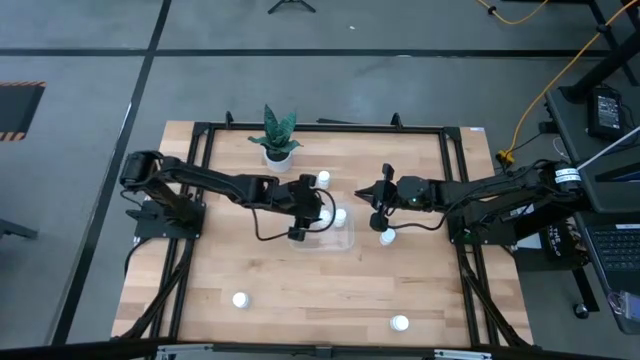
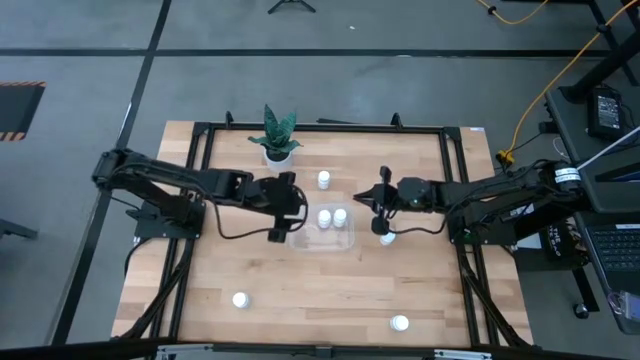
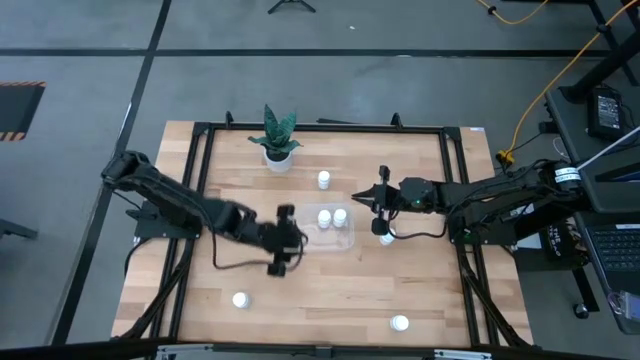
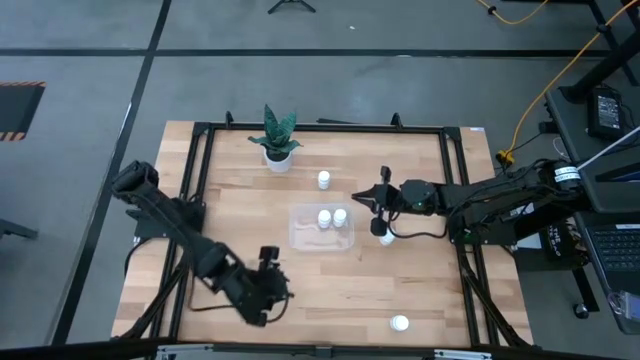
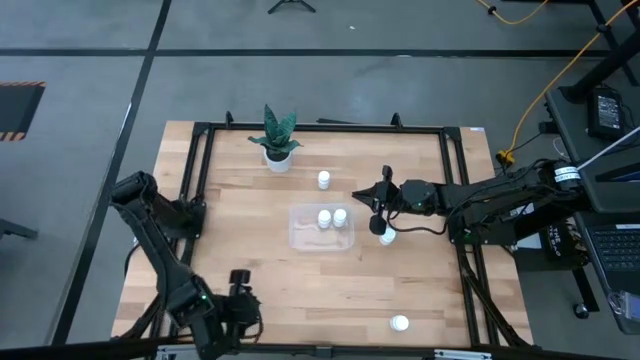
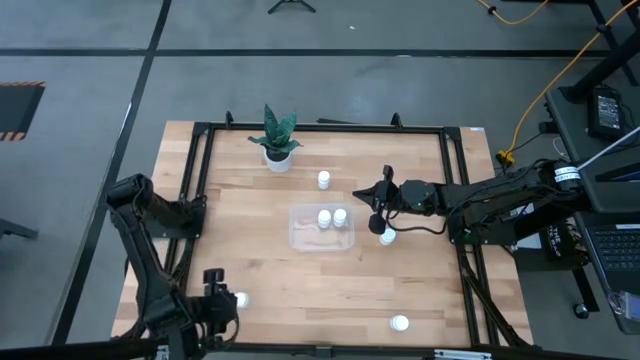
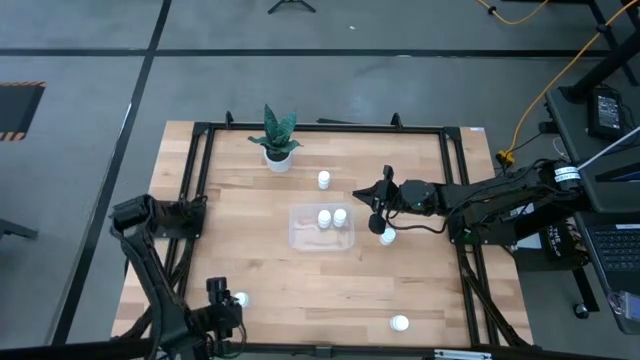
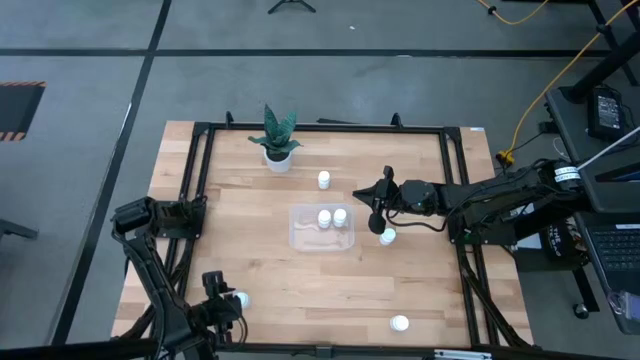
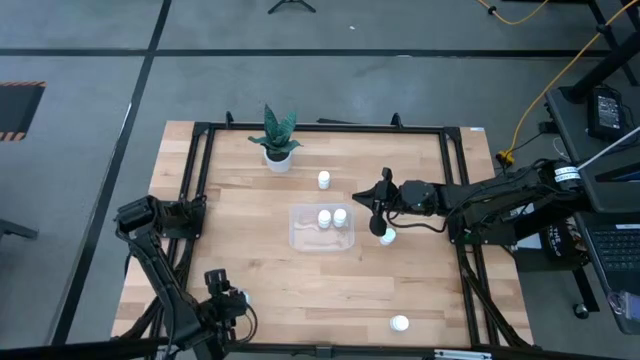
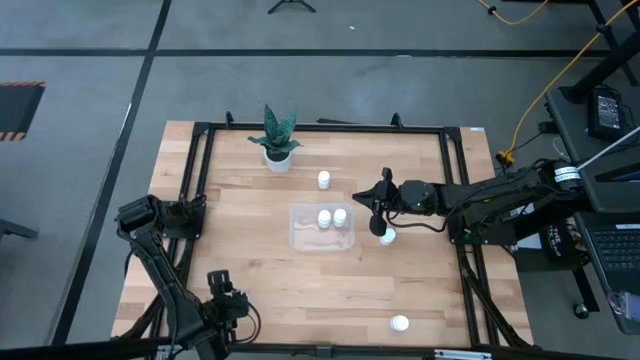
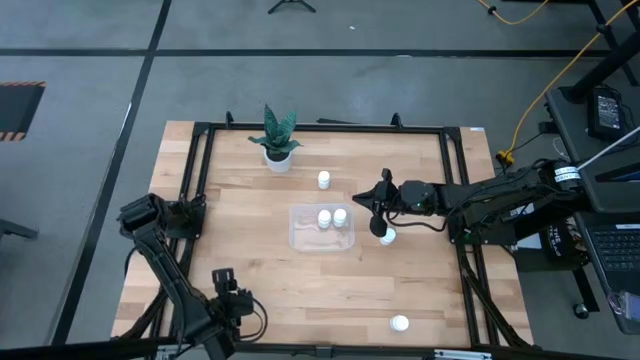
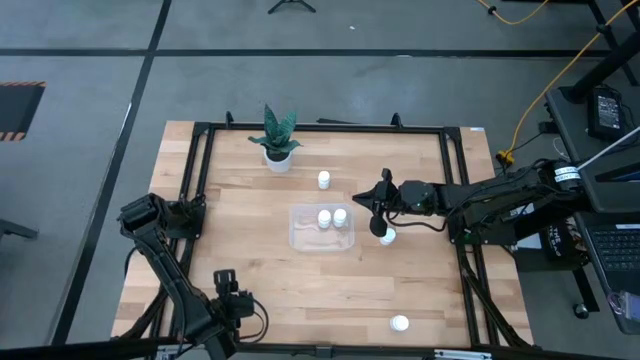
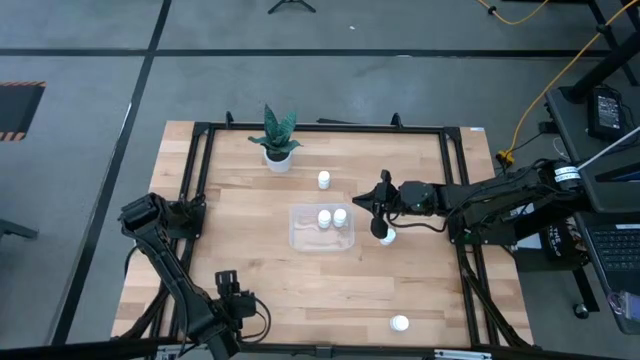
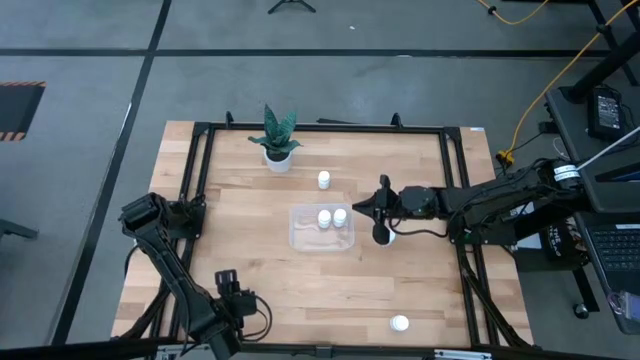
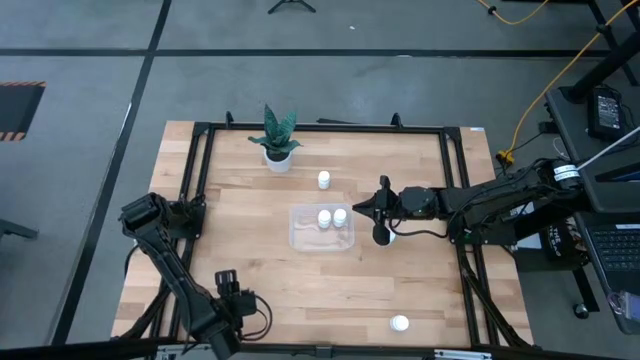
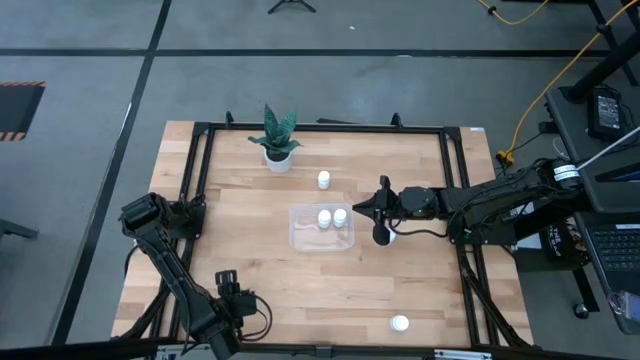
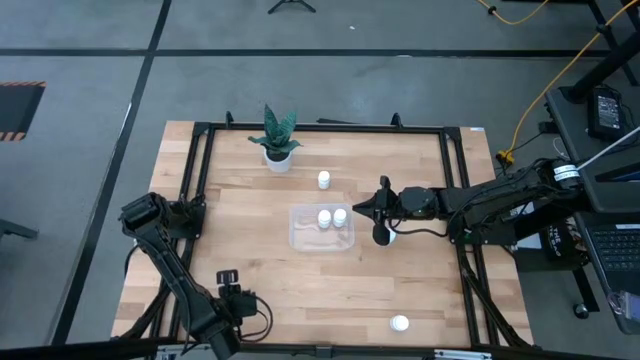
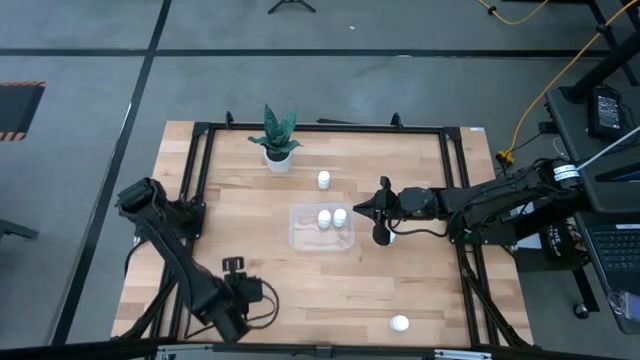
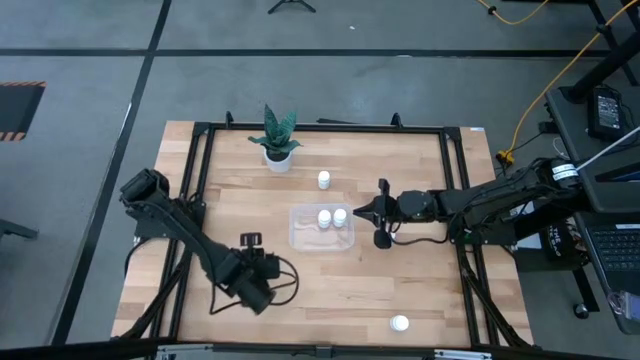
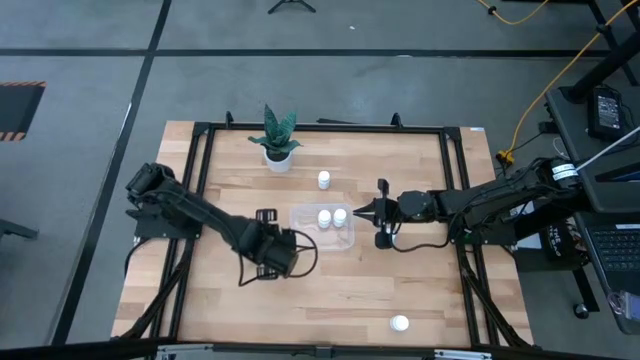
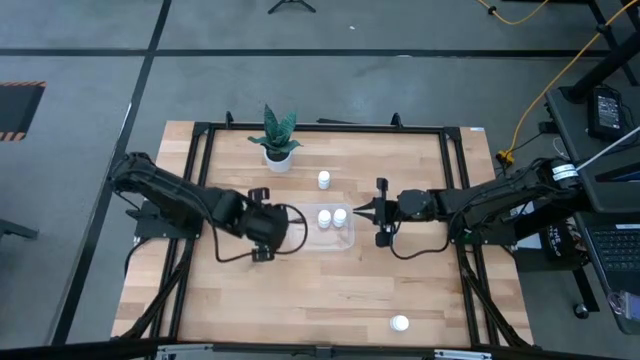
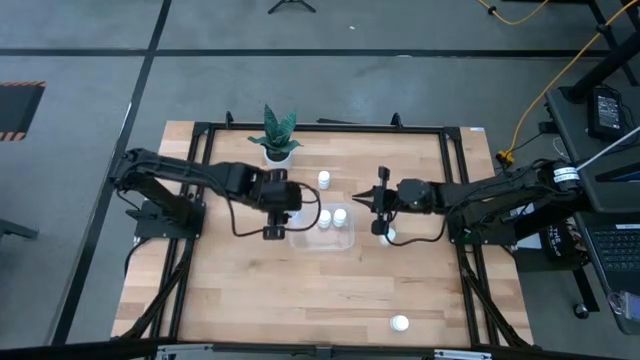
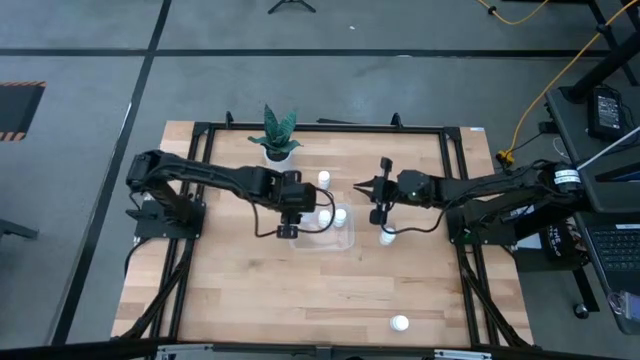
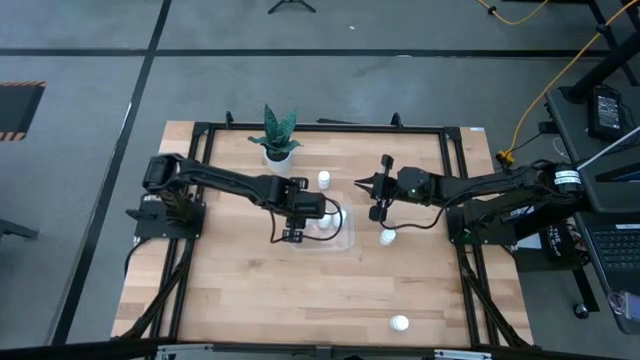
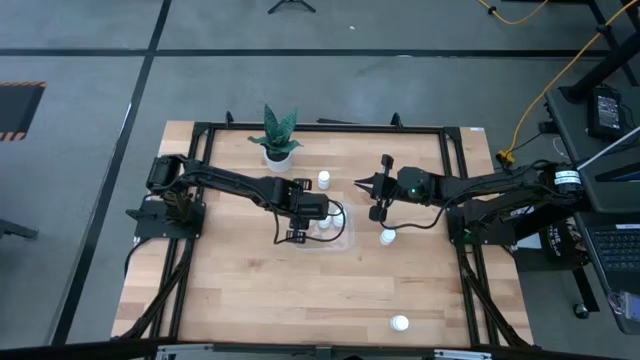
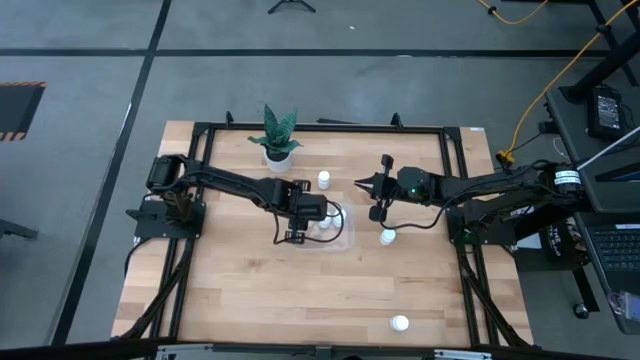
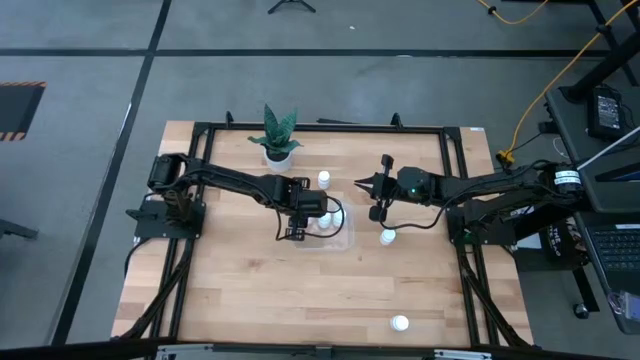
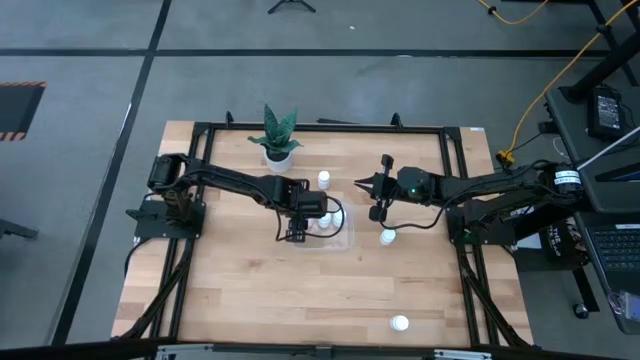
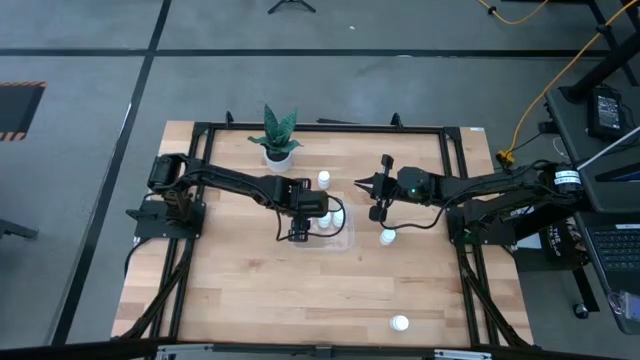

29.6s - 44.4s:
Task: Pick and place pill bottles into a basket
Put the white medicine bottle into the transparent bin

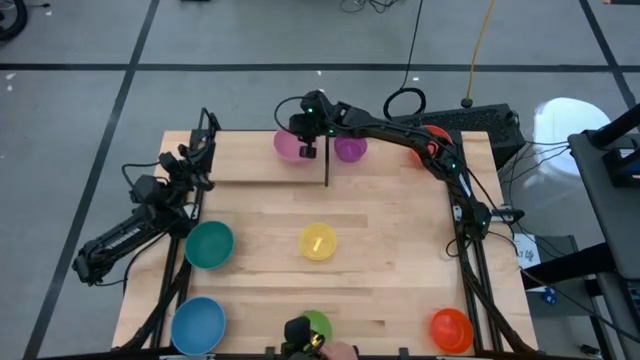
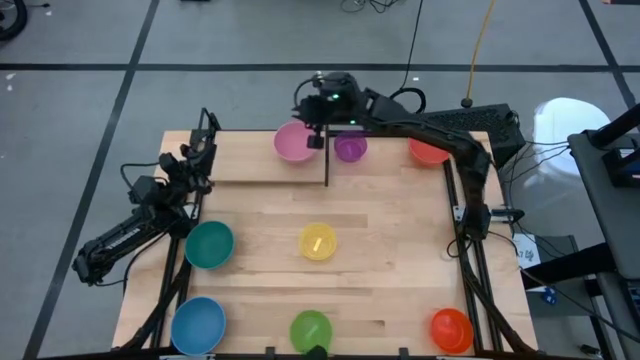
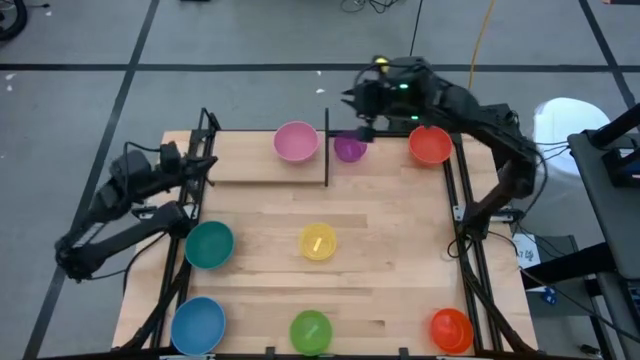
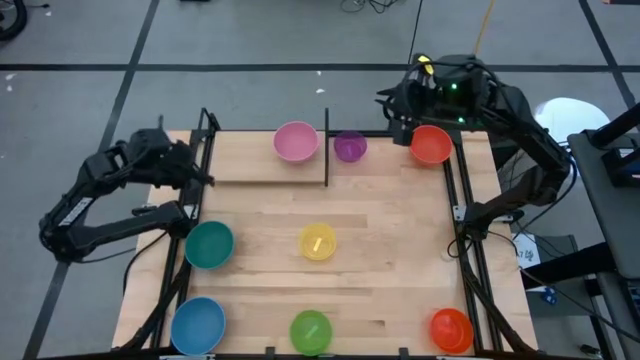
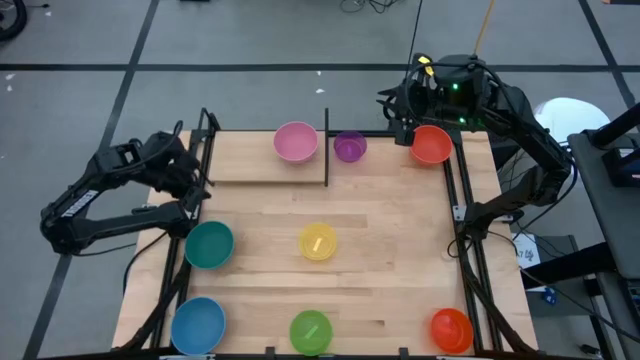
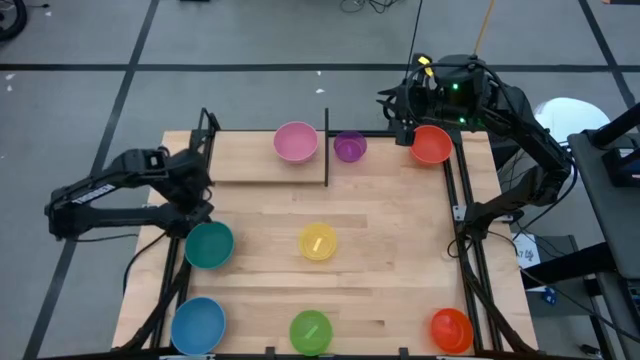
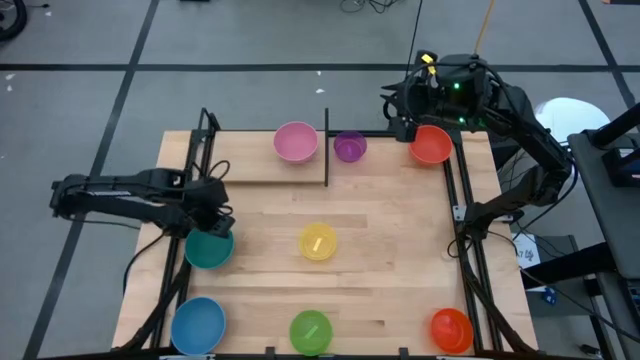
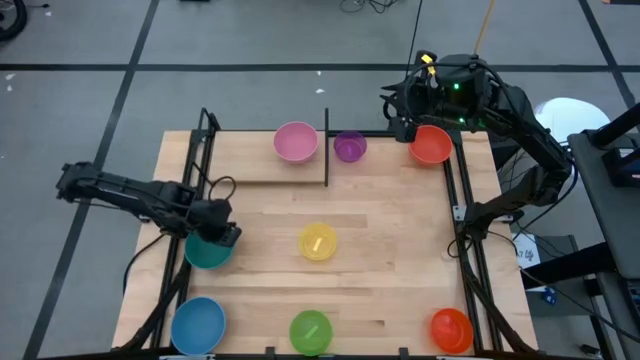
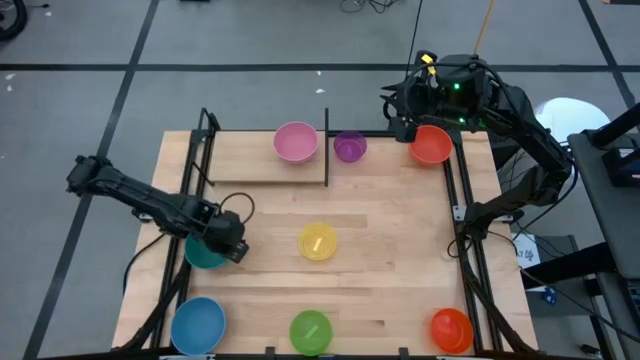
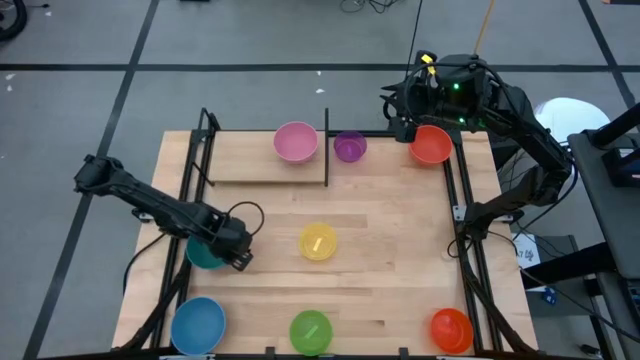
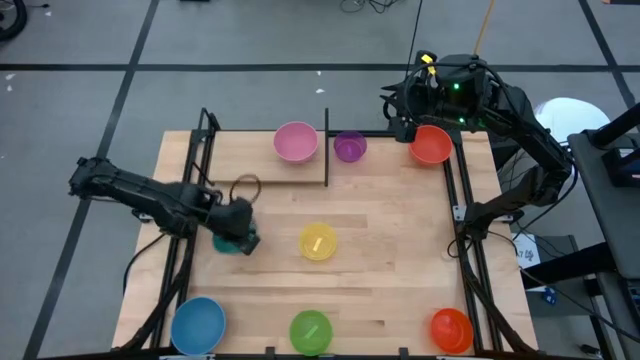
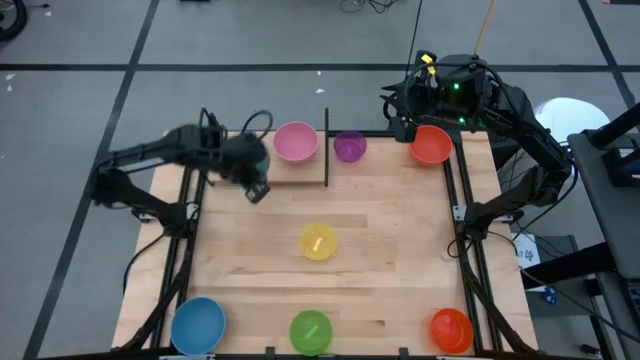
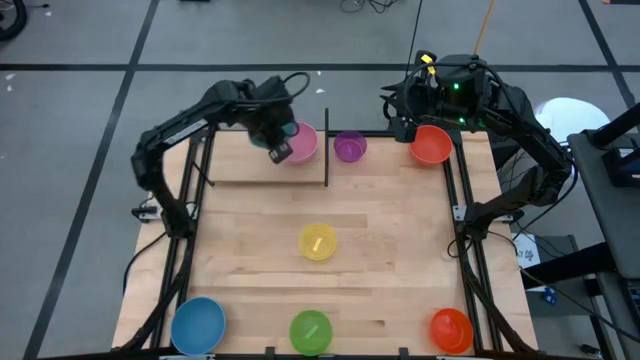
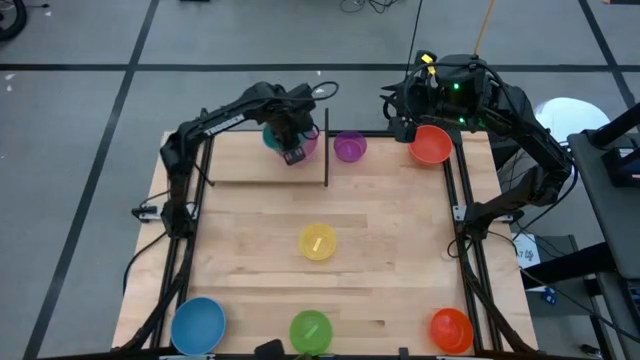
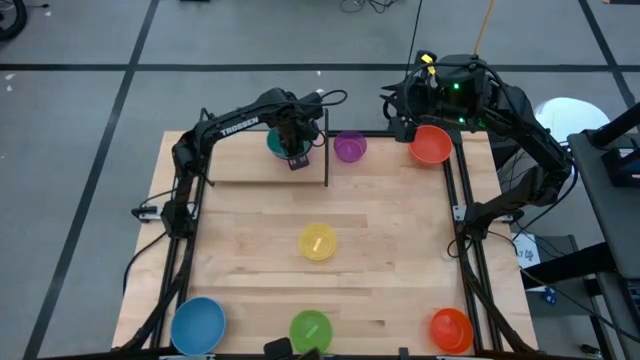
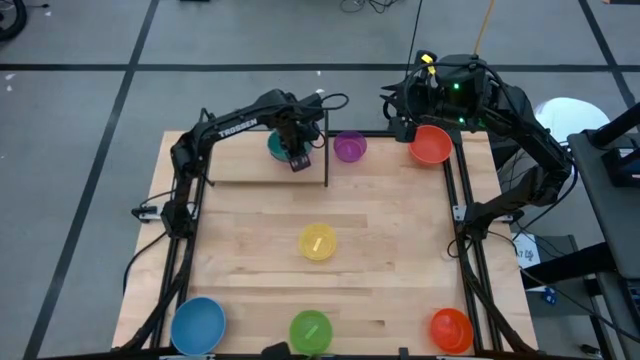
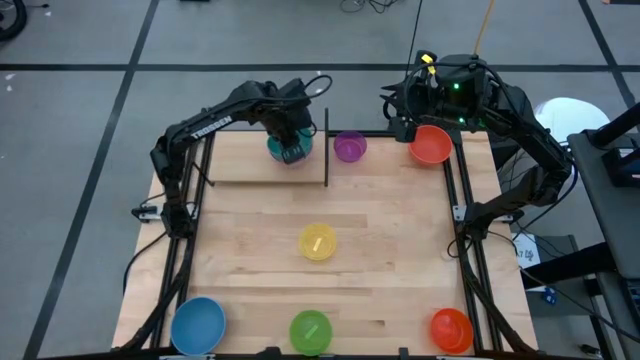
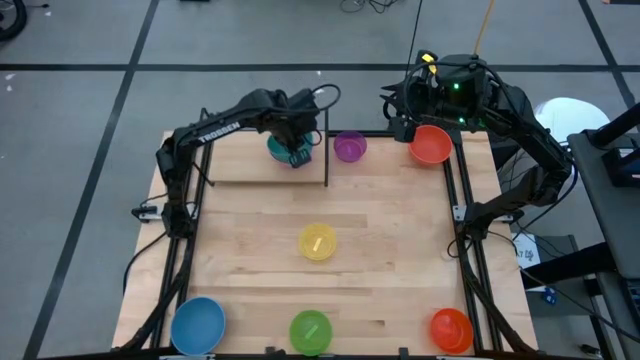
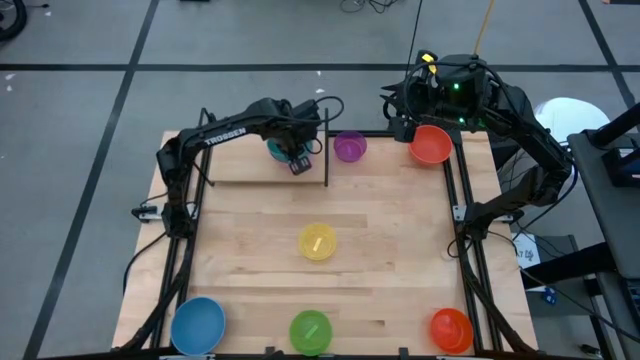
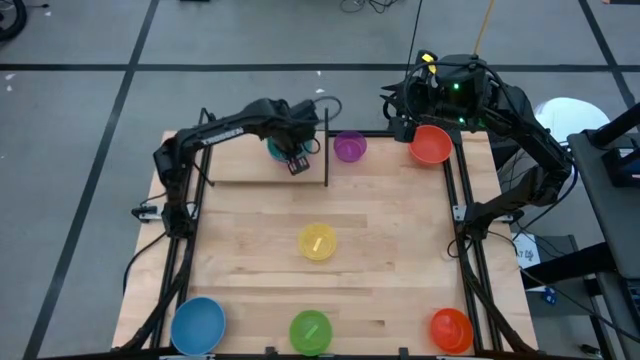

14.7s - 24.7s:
Task: Place and stack bowls onto a shelf
Stack the big green bowl into the pink bowl on the shelf
